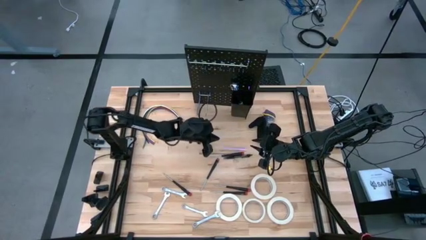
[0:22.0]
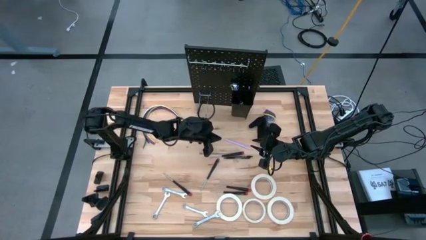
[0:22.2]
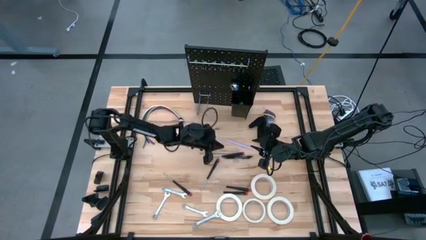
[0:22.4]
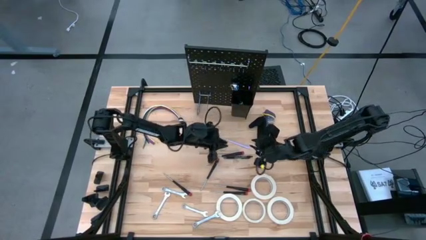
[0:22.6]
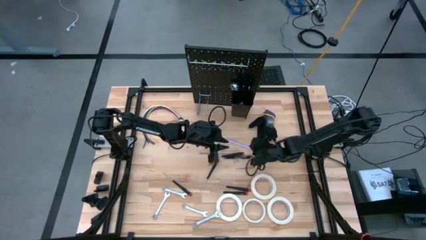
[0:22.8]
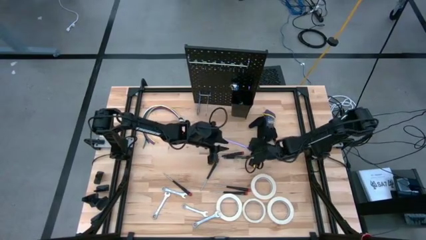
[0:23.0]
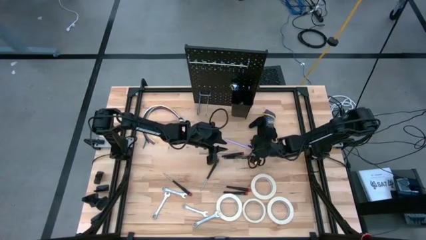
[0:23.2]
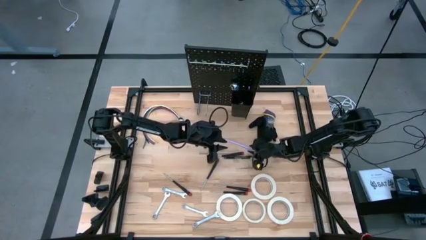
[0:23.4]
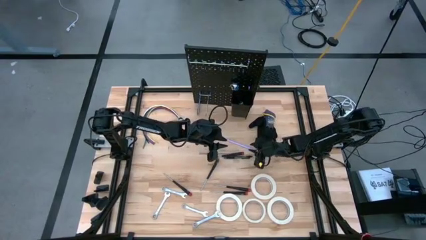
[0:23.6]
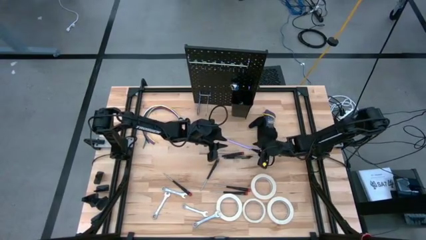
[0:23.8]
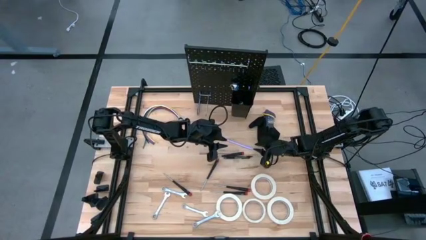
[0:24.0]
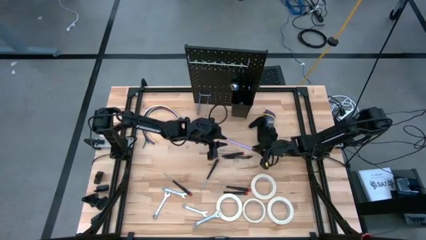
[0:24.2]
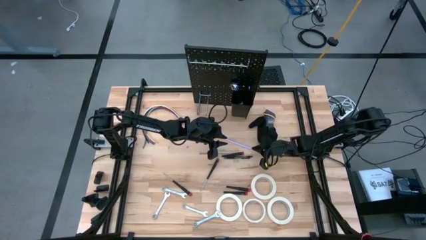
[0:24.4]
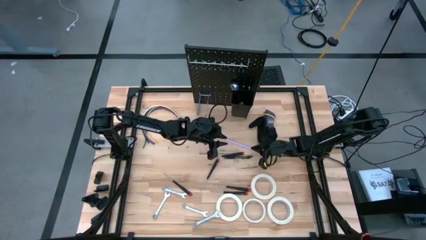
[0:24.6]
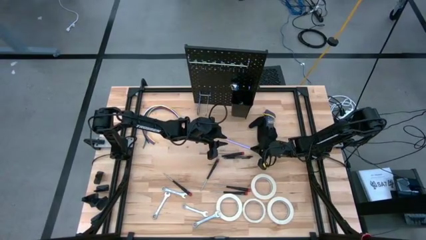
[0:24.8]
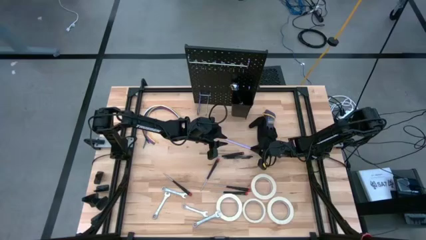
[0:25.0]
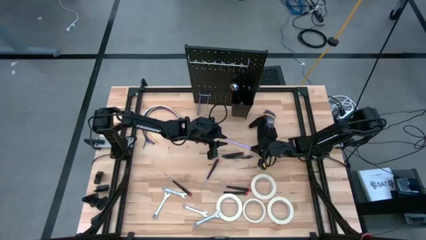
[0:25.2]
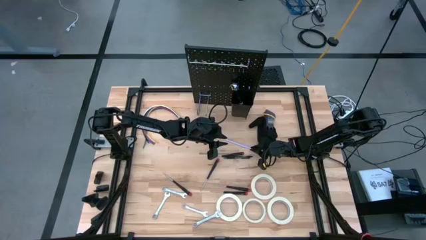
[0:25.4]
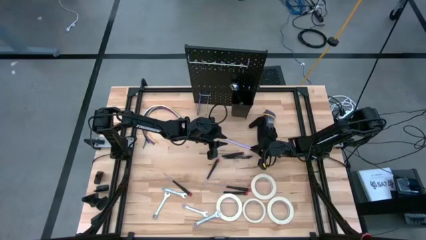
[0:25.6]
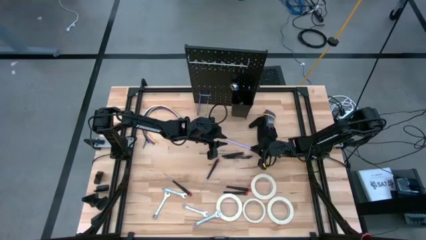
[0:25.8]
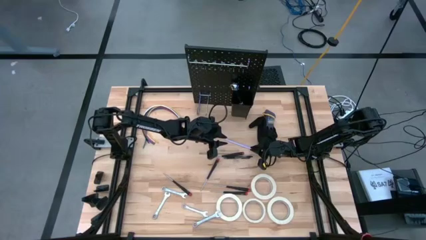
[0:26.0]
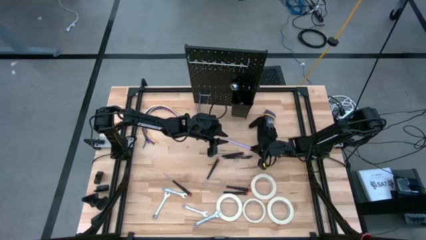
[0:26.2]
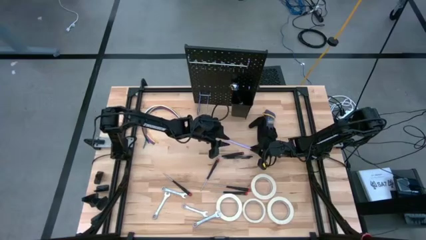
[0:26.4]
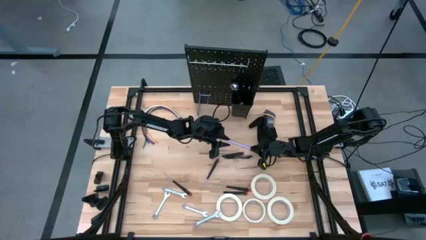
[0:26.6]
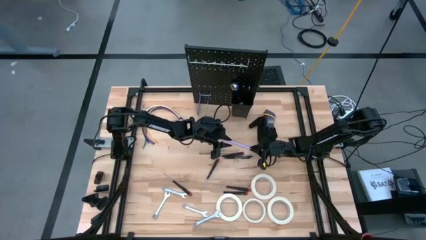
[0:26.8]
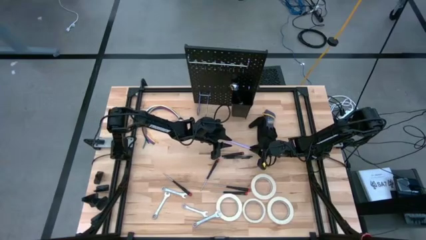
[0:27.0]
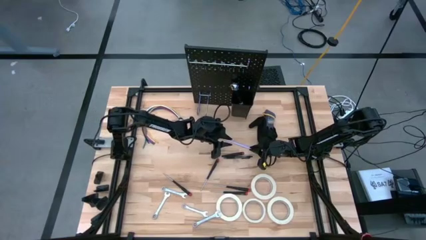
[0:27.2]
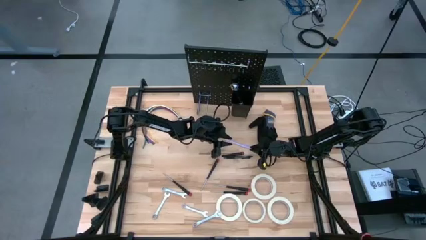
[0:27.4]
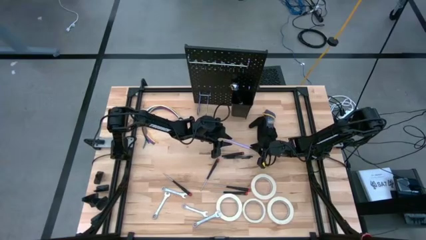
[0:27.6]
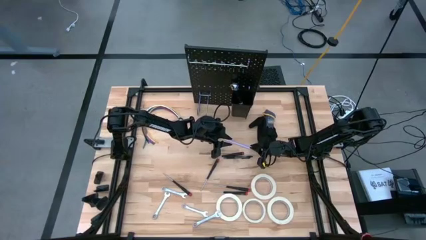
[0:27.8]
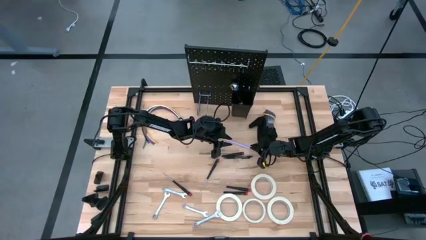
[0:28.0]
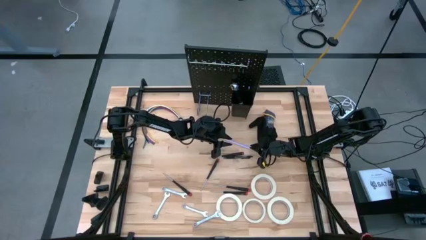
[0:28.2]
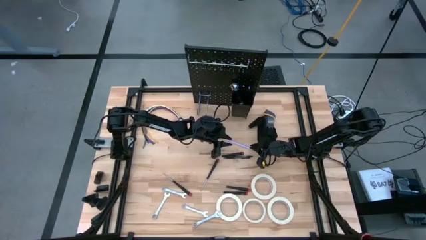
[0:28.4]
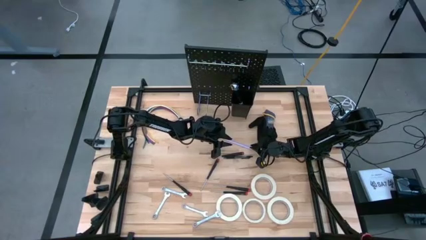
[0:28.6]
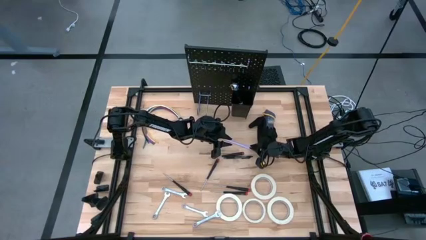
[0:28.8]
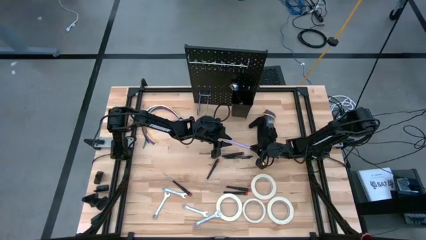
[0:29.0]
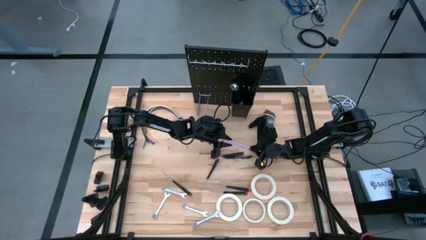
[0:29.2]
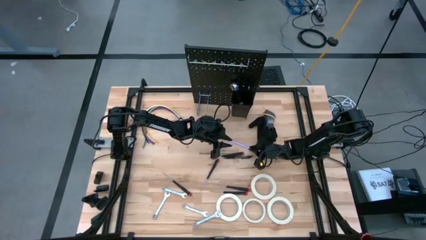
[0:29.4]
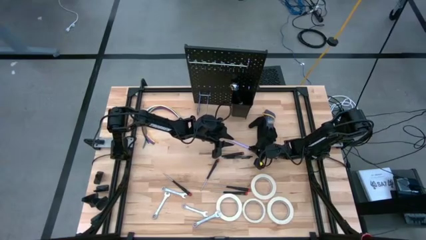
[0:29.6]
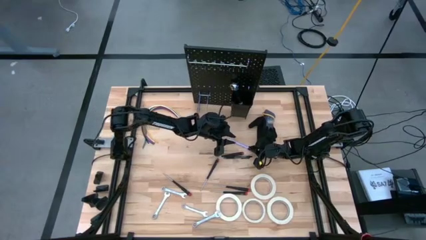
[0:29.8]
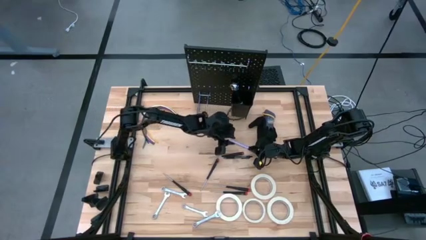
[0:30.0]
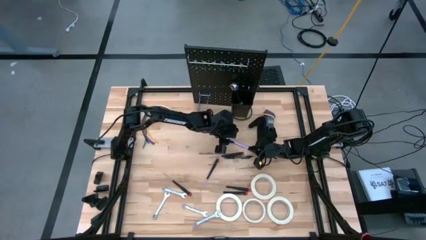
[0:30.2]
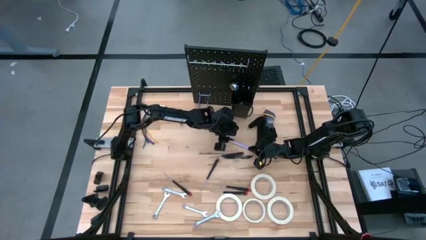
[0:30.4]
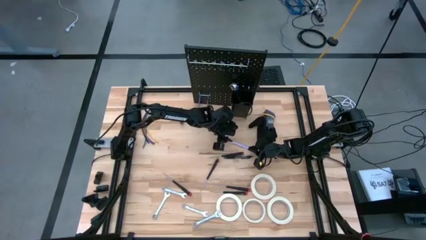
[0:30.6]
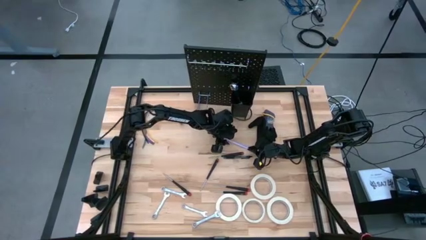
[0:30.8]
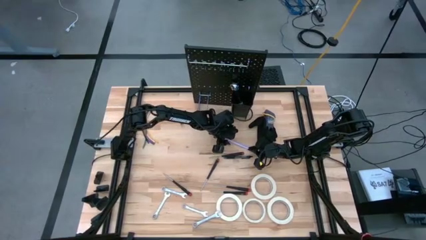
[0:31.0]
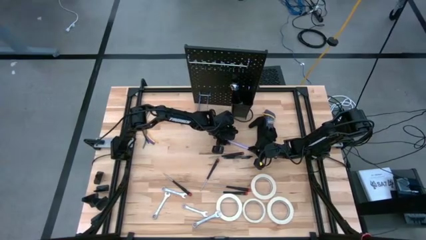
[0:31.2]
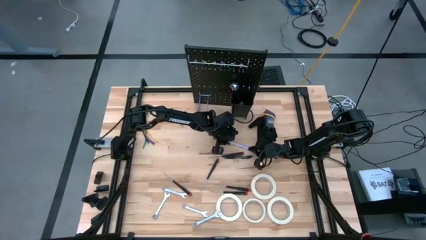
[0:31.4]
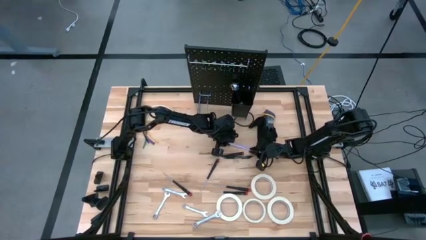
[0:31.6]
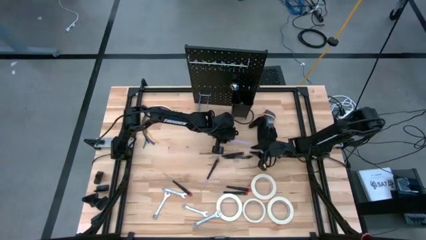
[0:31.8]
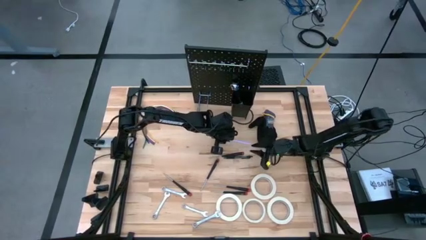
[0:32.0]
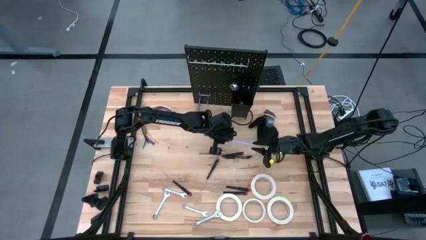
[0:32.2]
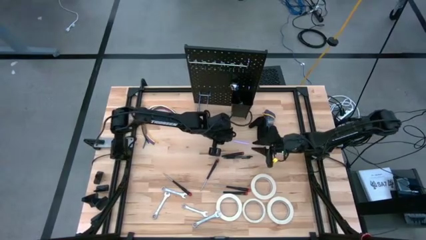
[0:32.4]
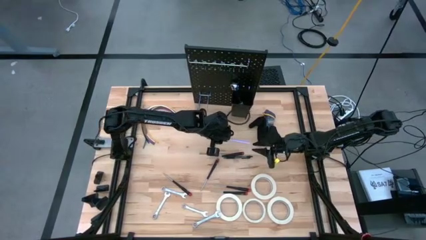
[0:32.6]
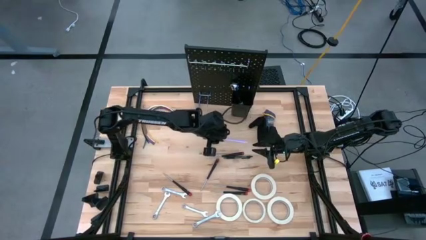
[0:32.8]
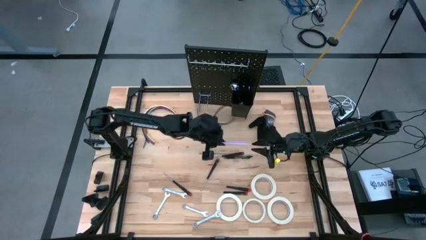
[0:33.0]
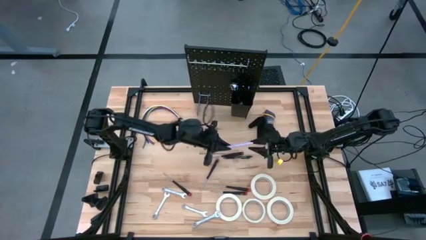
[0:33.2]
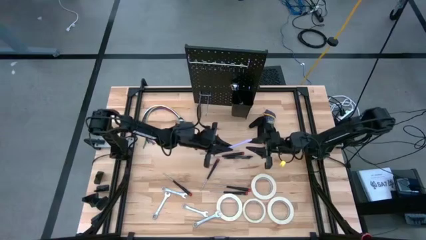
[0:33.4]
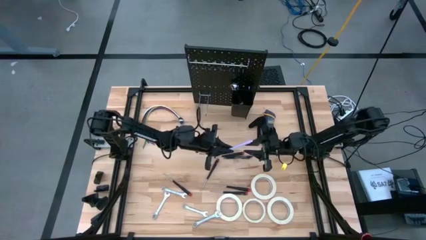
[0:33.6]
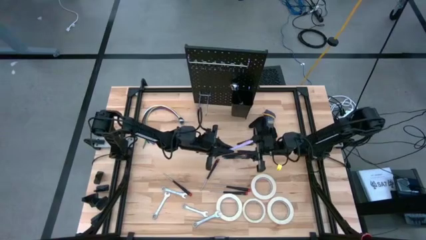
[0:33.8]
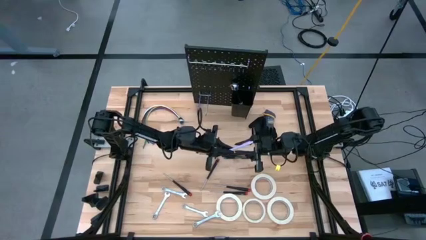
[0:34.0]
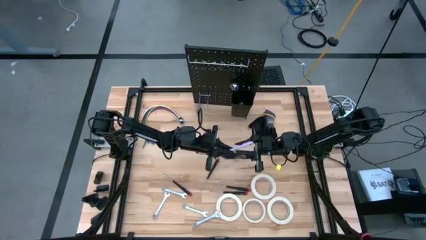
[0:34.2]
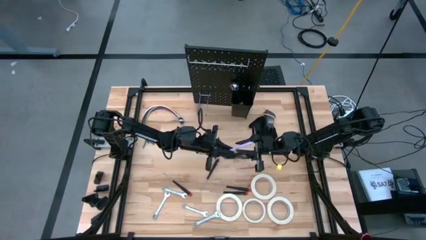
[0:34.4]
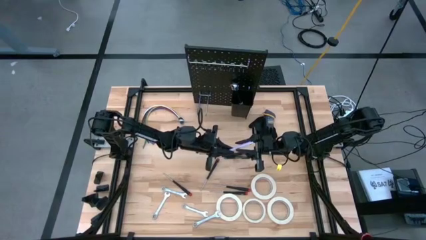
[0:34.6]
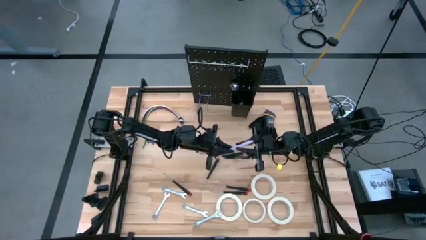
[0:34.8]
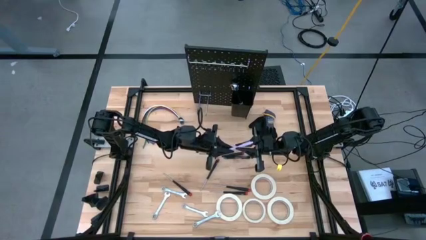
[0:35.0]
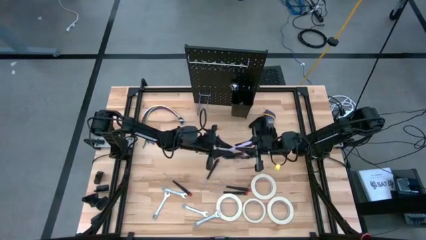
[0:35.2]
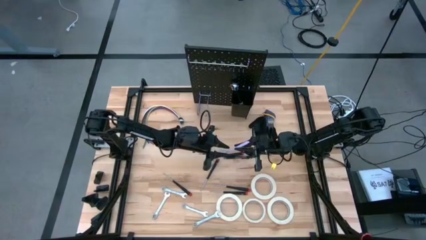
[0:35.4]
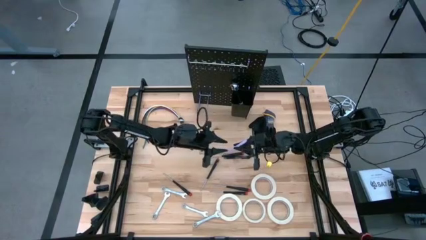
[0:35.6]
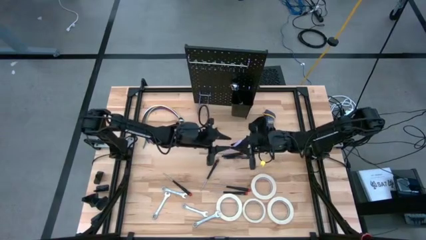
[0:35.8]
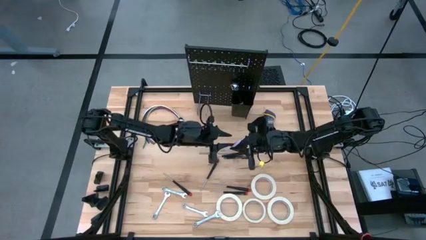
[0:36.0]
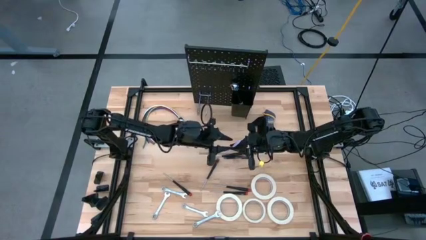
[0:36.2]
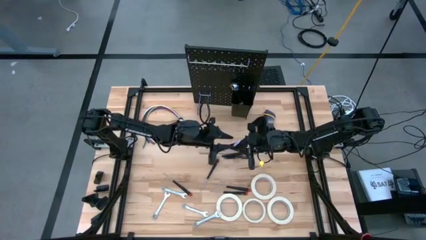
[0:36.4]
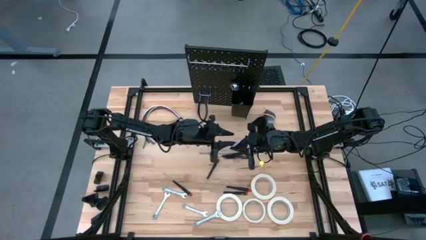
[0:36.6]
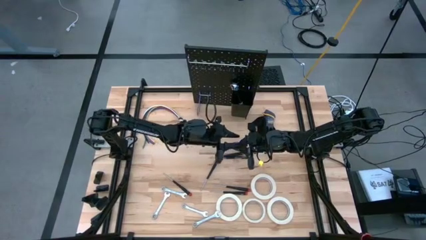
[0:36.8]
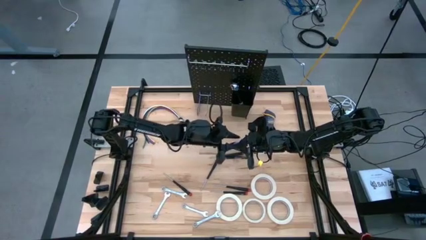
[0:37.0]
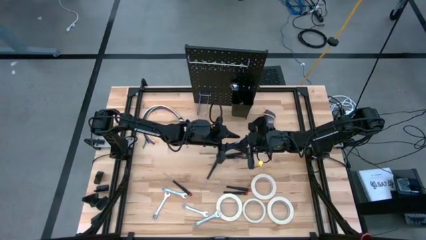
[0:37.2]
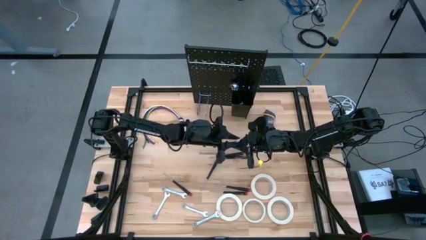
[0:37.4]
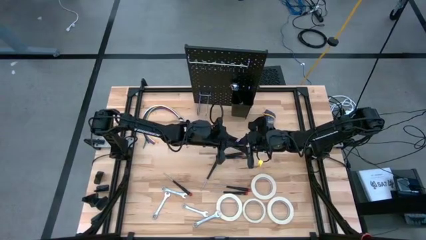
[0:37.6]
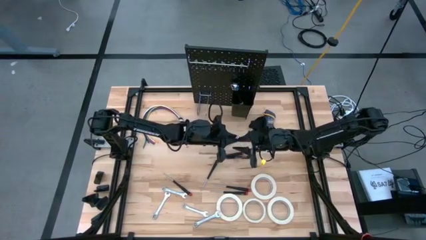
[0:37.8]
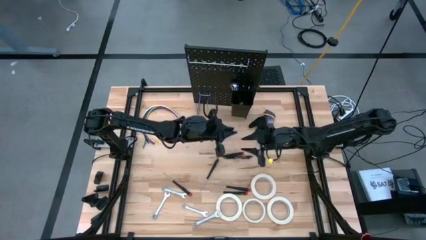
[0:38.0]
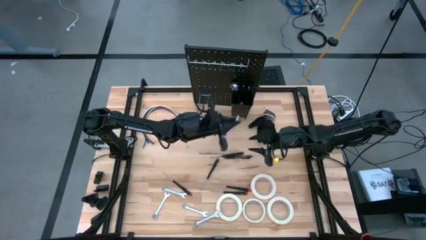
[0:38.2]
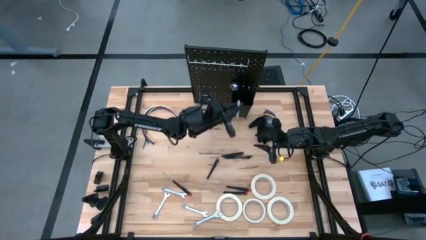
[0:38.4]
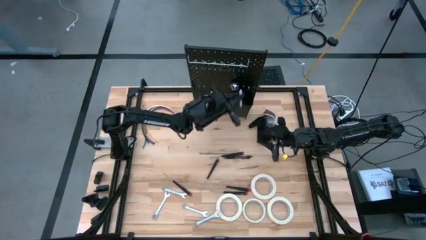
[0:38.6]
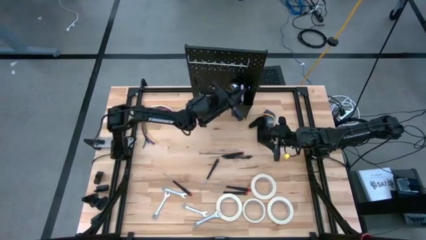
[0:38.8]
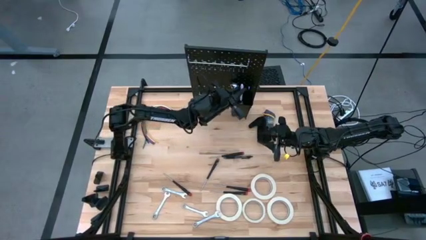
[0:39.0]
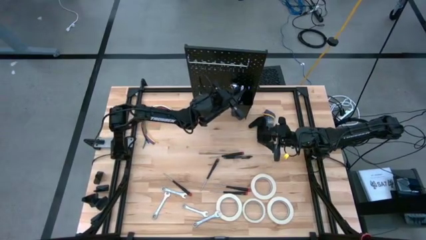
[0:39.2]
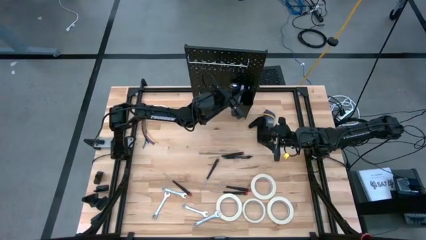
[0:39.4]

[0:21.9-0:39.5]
Task: Hang tools onto peg board
Put the purple pen into the black bin on the peg board
